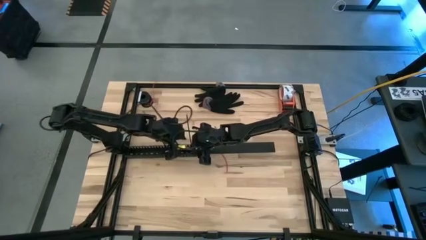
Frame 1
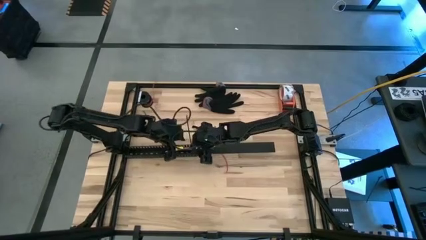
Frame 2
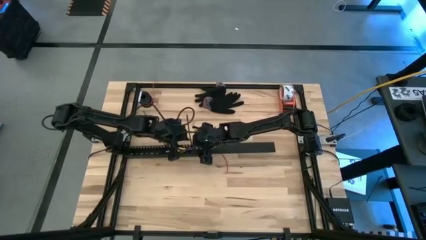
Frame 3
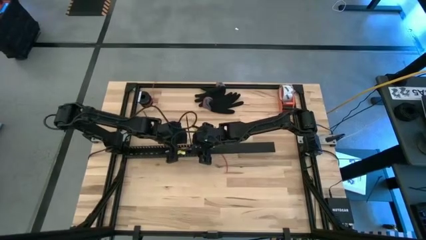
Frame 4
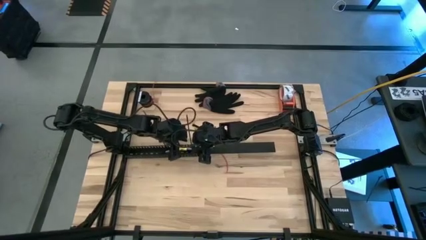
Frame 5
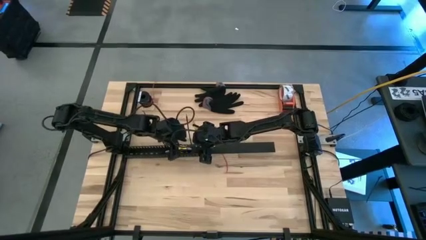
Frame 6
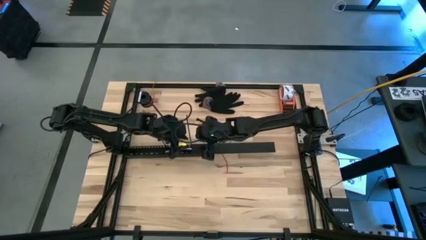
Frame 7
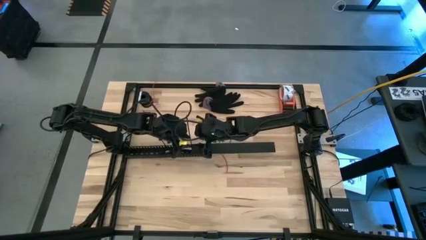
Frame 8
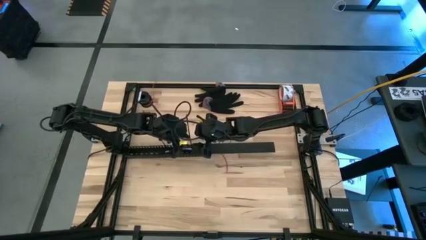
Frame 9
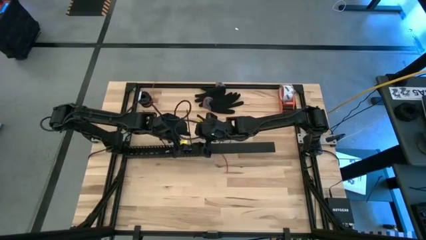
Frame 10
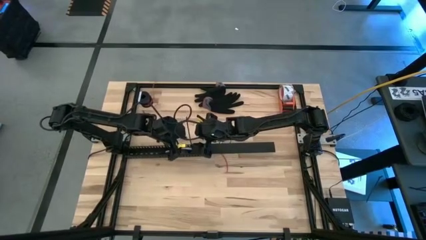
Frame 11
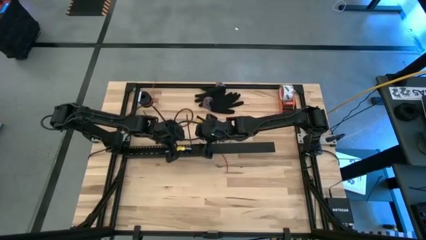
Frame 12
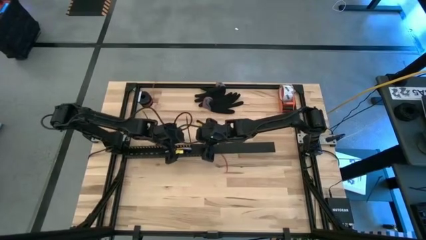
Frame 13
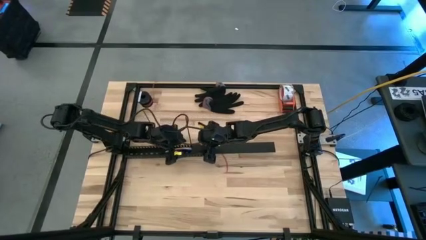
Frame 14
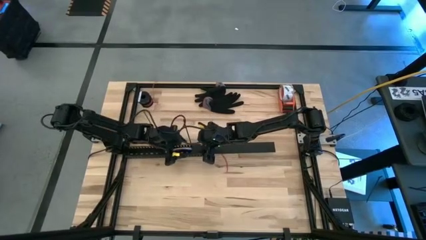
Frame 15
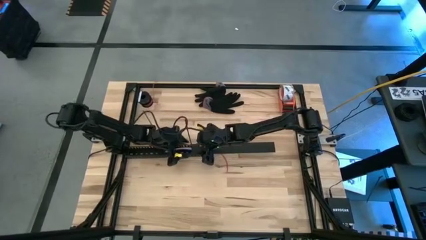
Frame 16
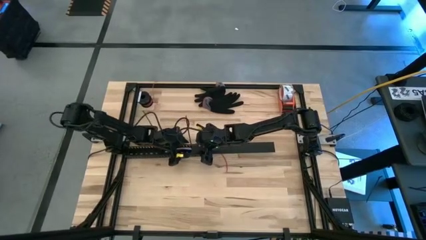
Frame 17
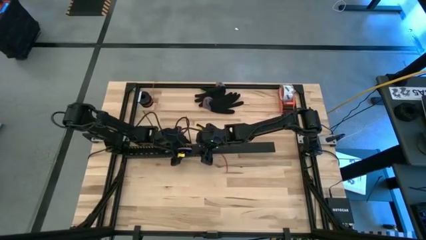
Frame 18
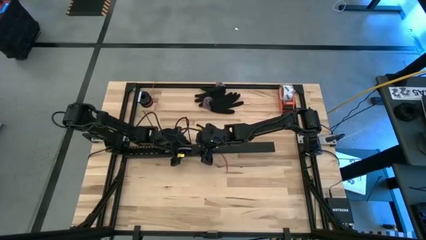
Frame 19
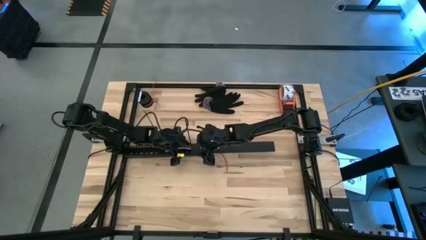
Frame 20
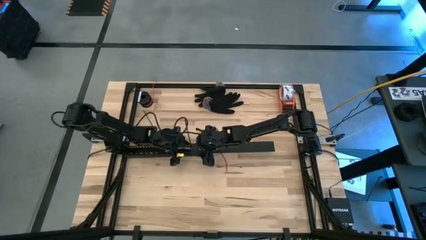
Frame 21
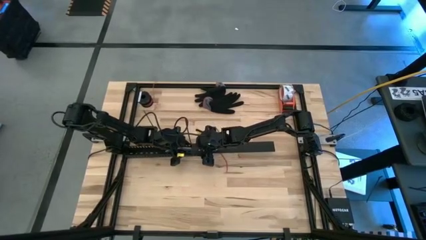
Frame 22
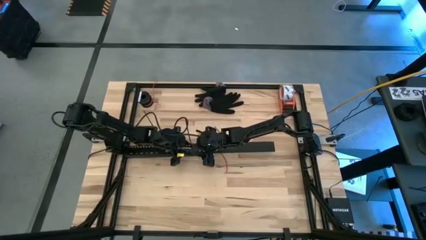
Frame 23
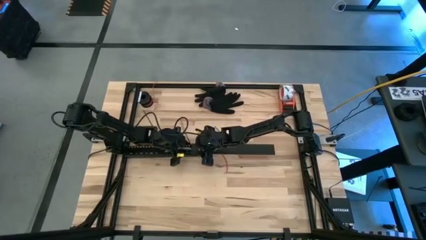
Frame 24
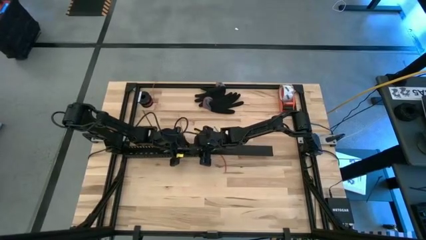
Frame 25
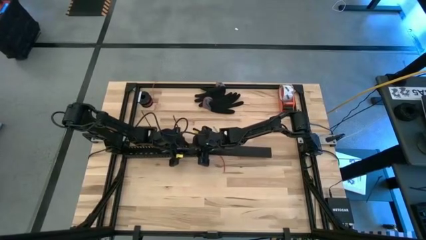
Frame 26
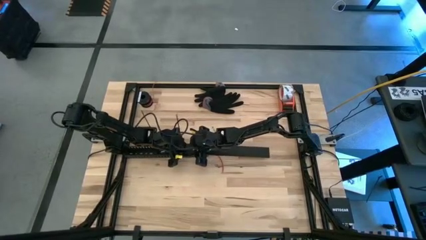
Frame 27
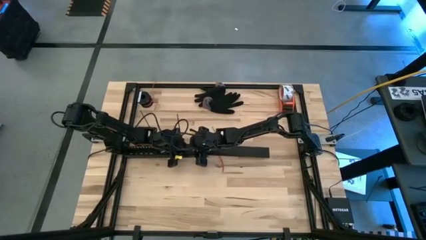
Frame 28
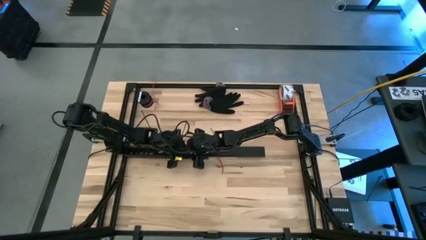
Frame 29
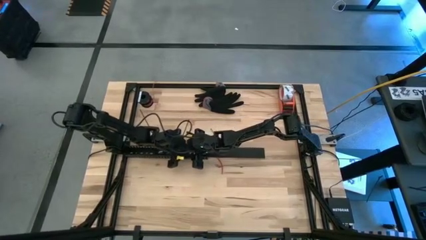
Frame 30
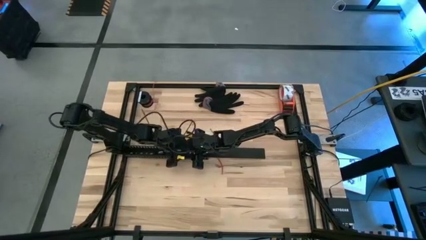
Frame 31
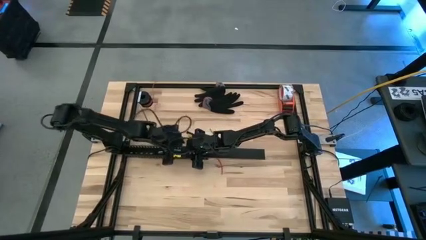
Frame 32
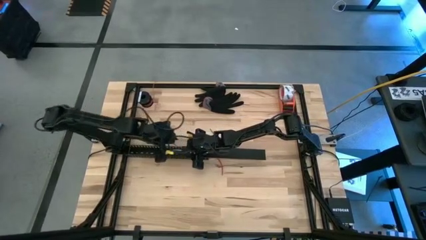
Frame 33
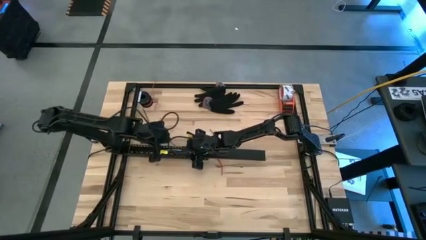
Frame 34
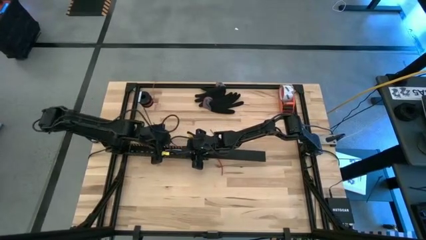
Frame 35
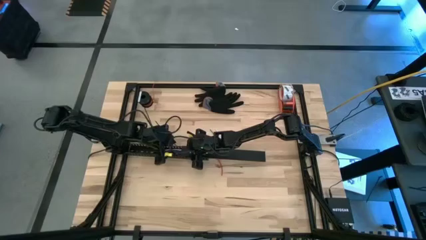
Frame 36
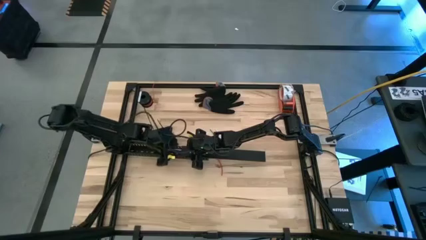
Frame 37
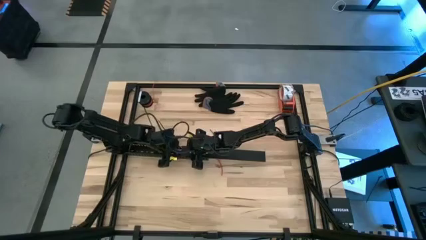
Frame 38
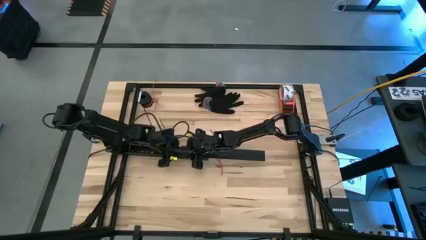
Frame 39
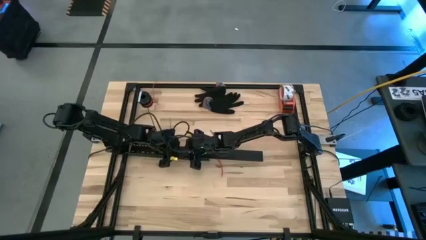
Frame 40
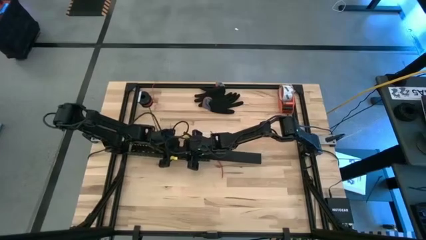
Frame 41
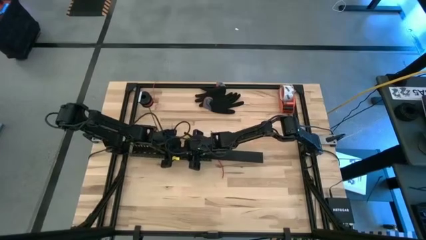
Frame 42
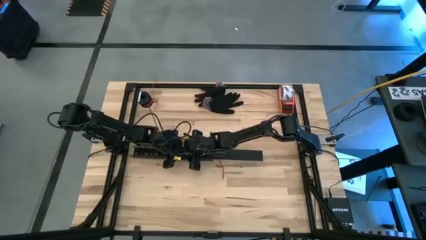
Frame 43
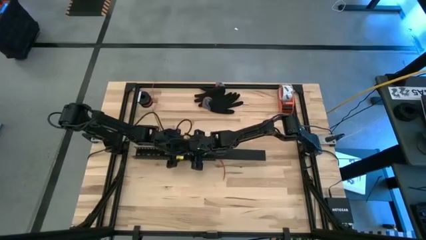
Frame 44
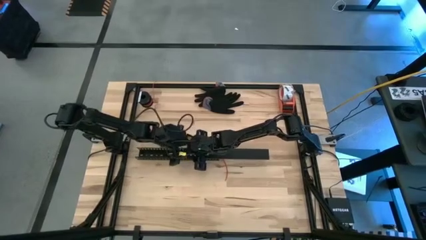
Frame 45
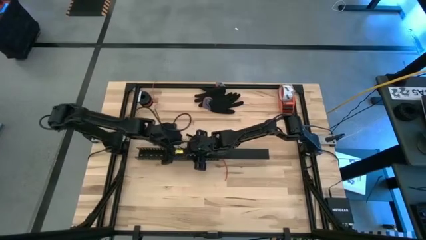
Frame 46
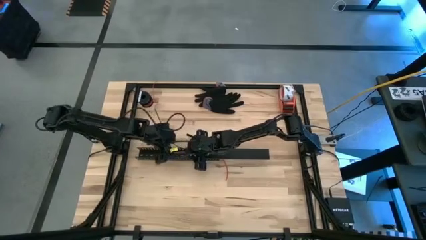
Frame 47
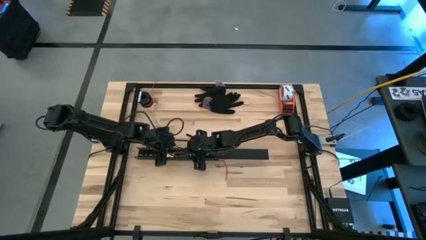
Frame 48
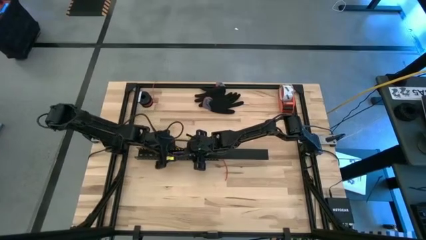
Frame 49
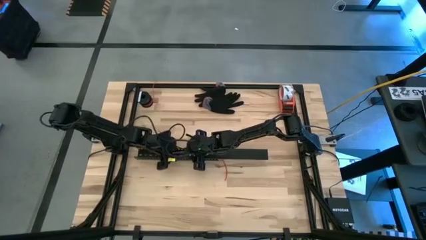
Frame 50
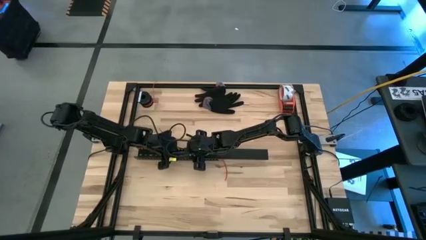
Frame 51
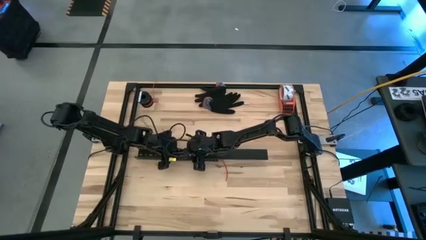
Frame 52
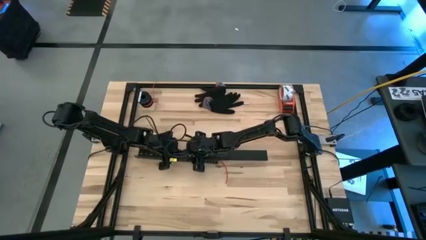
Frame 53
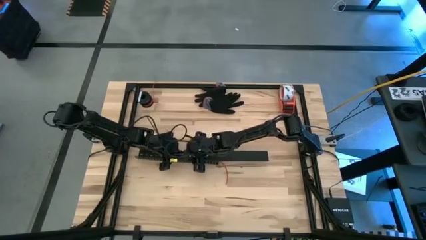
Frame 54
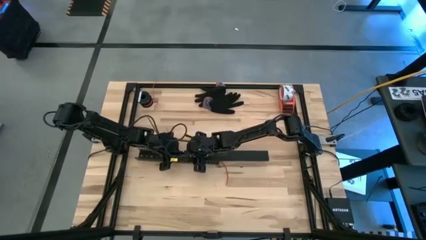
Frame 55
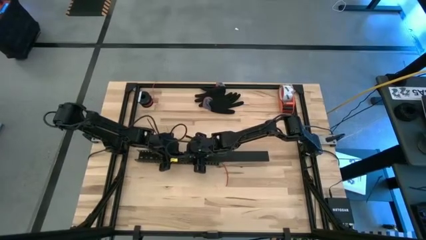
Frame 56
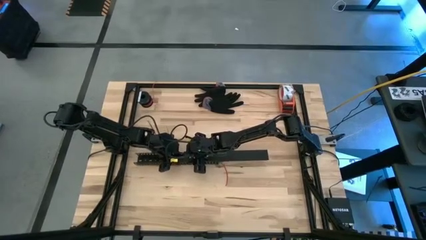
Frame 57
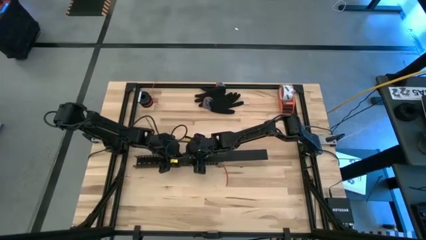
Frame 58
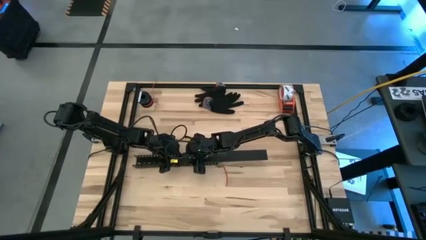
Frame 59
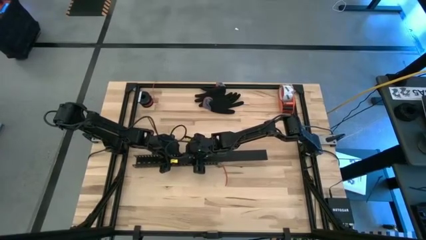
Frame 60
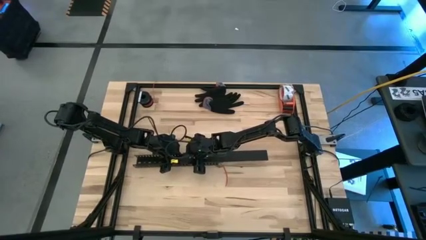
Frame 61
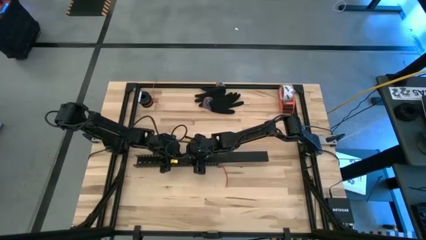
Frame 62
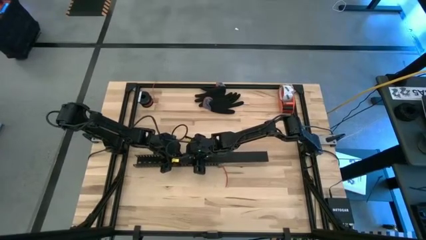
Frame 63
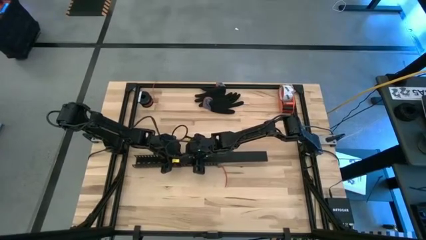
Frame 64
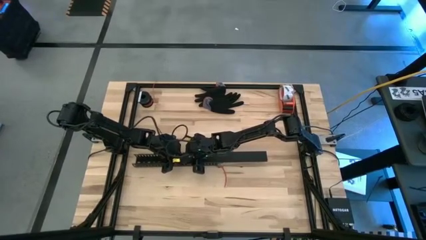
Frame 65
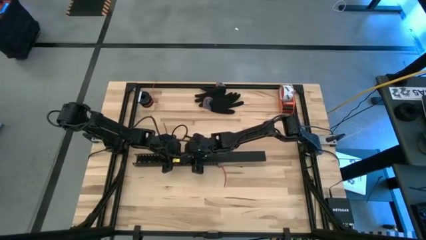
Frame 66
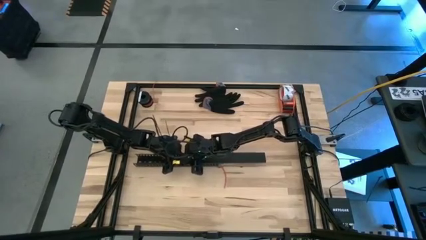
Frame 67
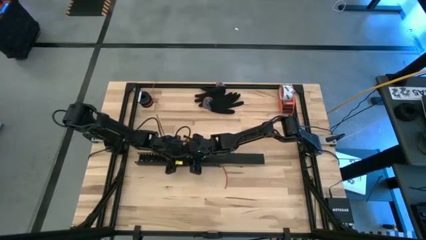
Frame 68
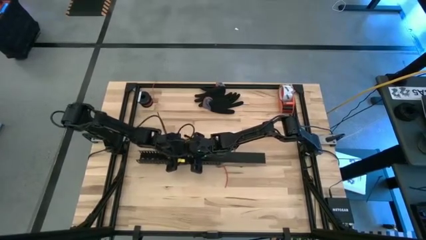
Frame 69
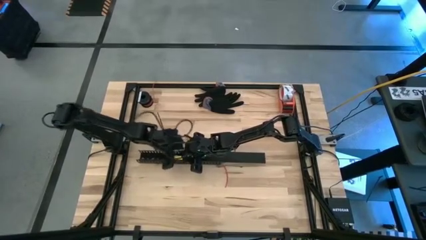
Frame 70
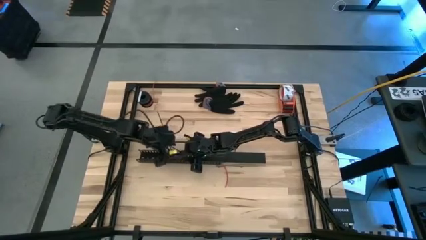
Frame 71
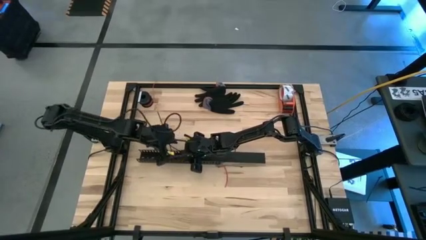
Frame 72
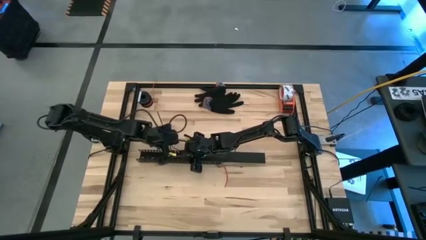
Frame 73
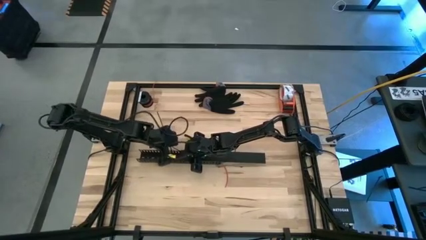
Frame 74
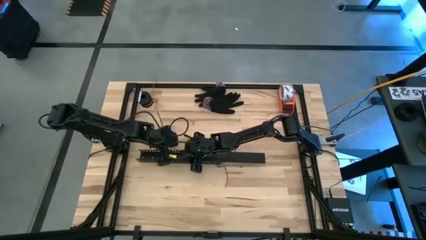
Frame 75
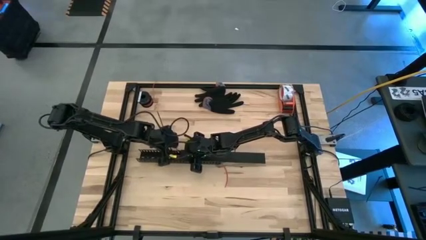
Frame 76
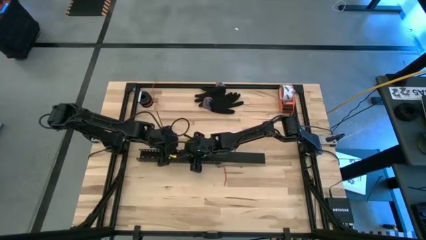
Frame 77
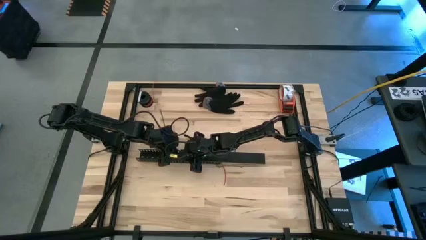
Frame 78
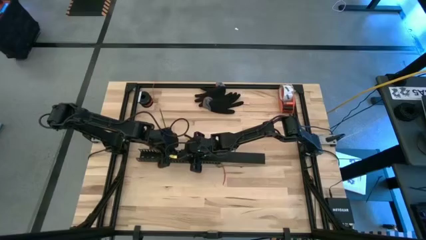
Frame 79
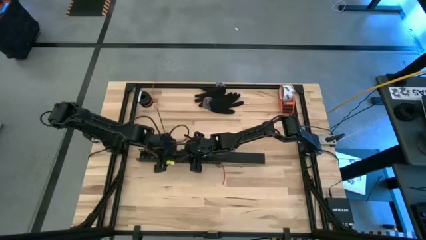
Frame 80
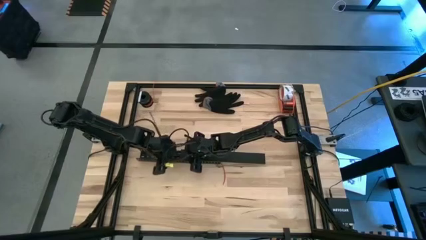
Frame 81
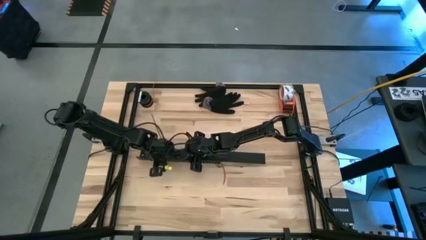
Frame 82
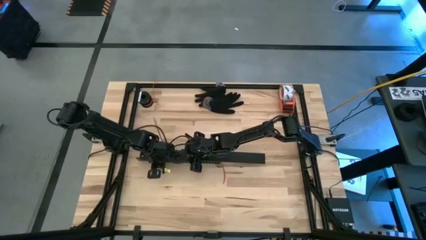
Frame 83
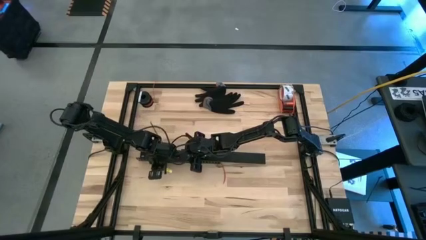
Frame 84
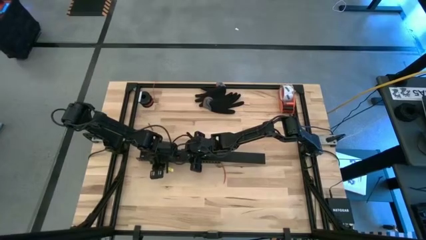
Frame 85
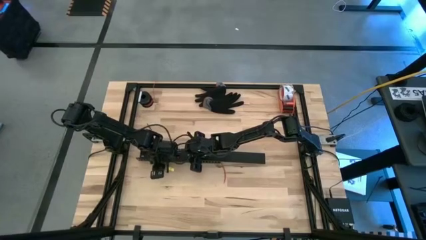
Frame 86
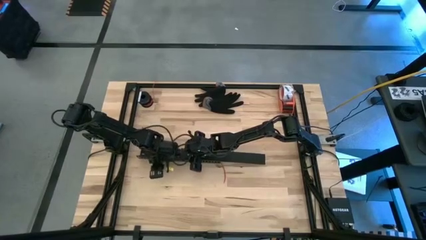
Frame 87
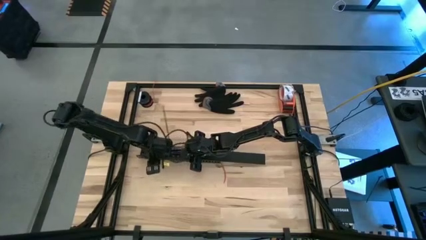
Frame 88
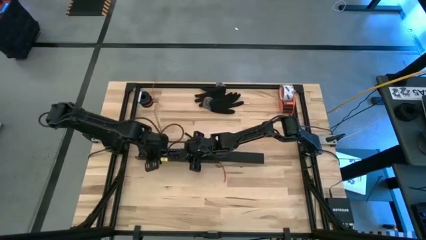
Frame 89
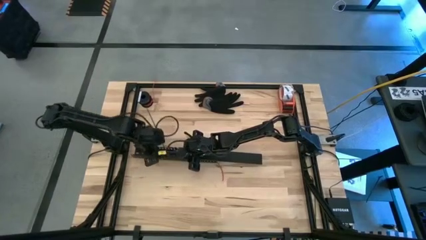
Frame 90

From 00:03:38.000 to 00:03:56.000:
Task: Ziptie cables
Close the black cable duct lid
